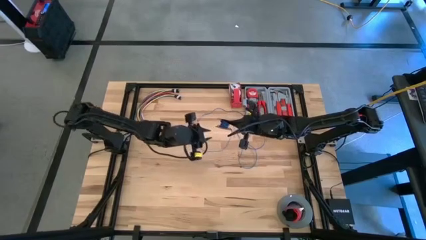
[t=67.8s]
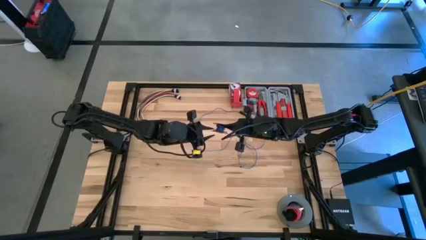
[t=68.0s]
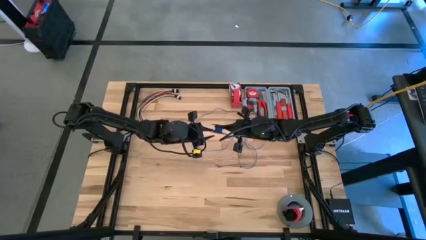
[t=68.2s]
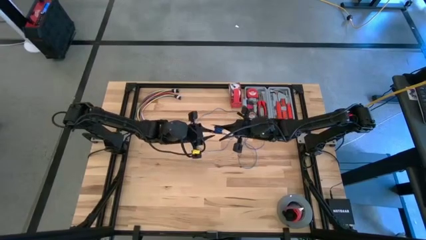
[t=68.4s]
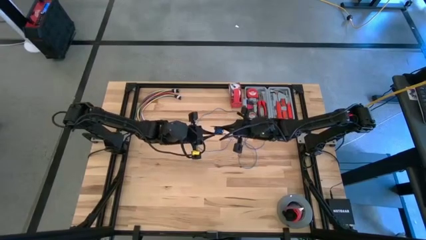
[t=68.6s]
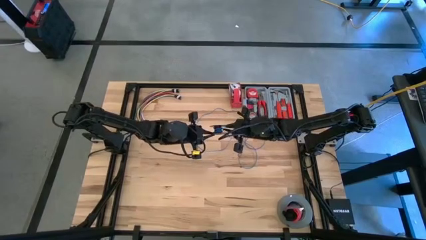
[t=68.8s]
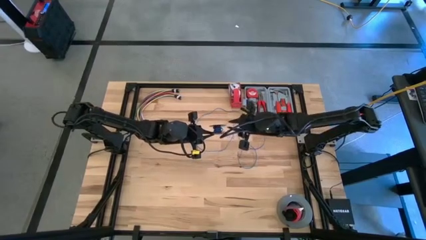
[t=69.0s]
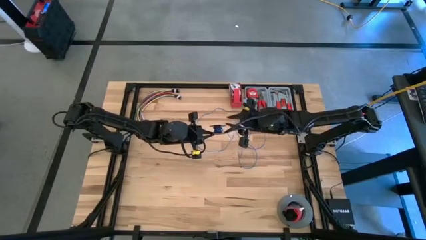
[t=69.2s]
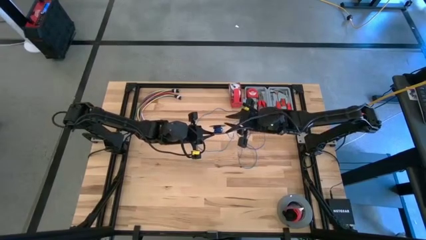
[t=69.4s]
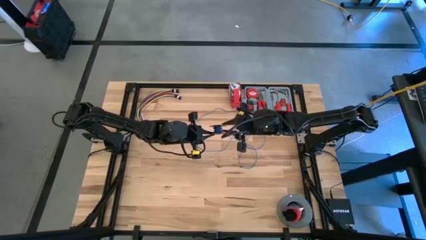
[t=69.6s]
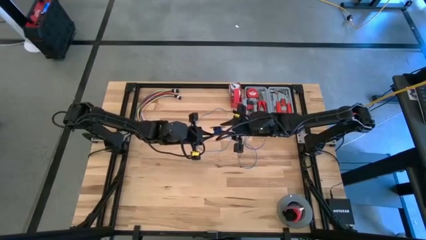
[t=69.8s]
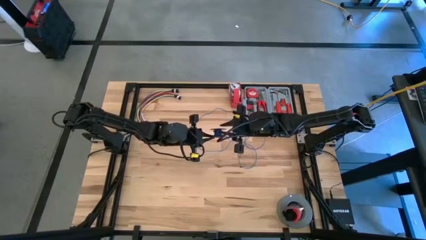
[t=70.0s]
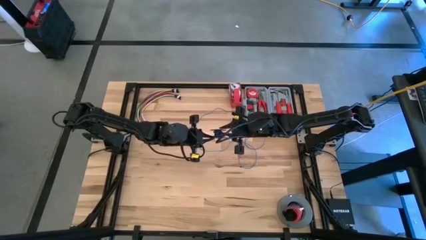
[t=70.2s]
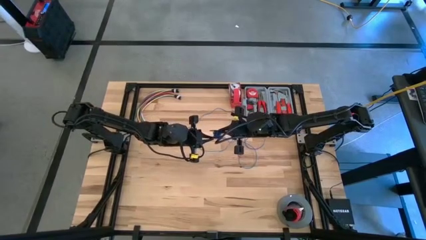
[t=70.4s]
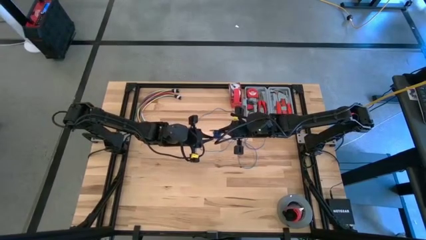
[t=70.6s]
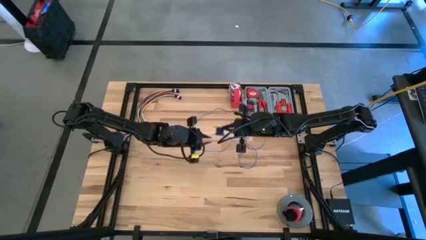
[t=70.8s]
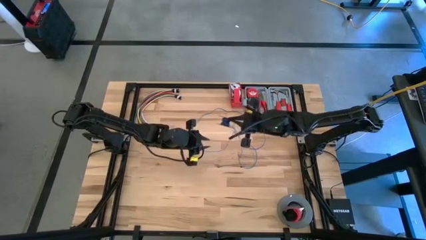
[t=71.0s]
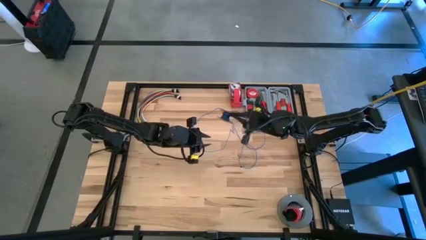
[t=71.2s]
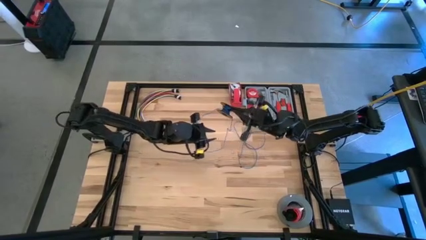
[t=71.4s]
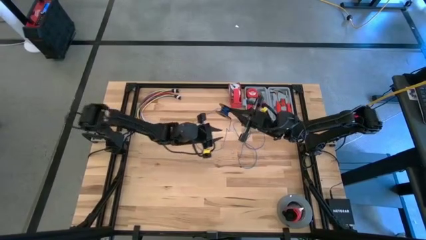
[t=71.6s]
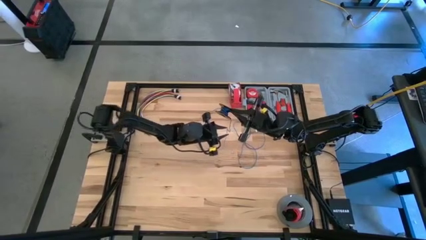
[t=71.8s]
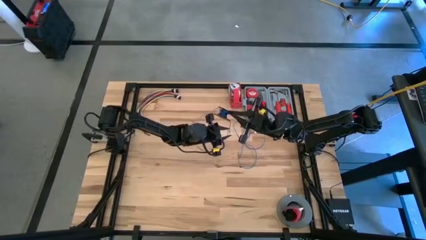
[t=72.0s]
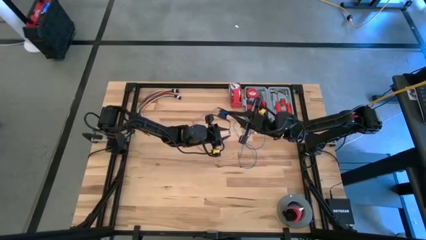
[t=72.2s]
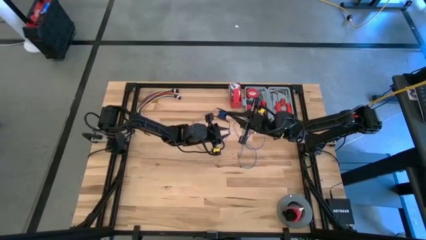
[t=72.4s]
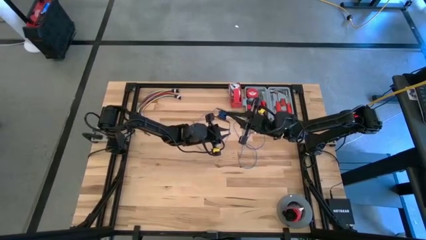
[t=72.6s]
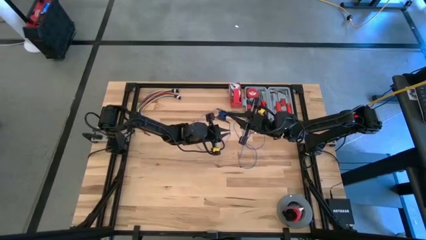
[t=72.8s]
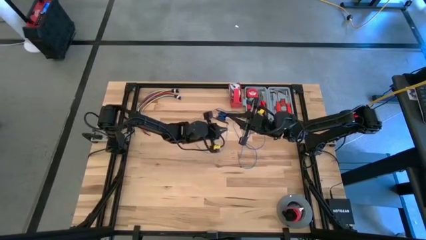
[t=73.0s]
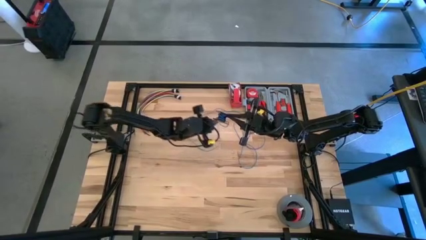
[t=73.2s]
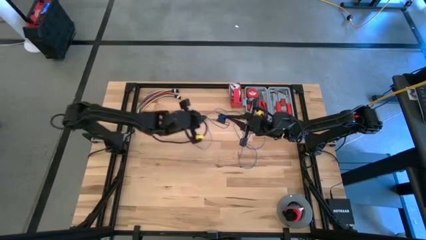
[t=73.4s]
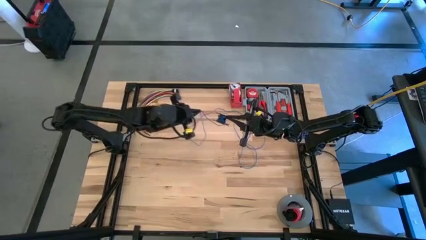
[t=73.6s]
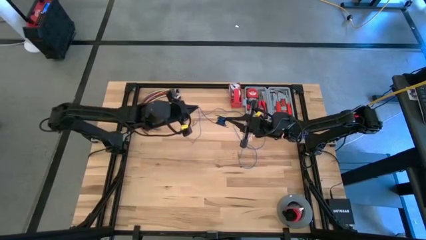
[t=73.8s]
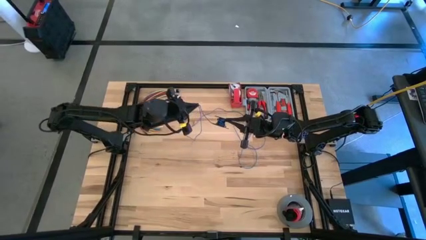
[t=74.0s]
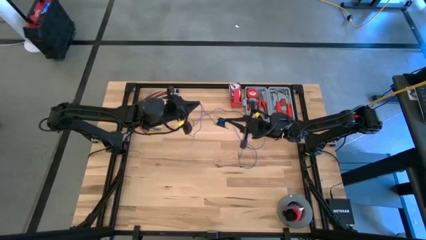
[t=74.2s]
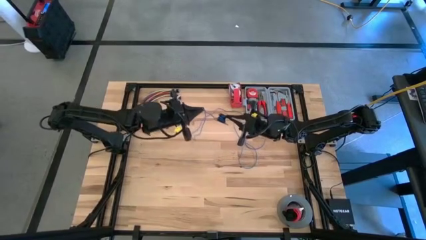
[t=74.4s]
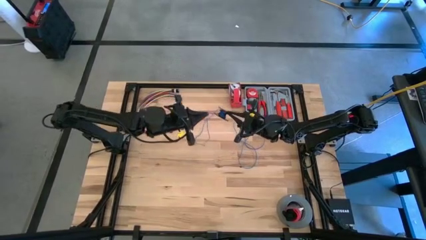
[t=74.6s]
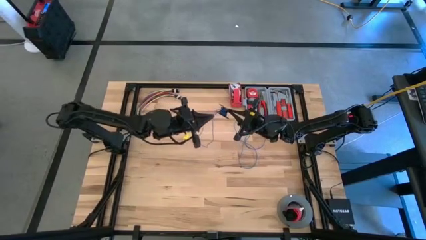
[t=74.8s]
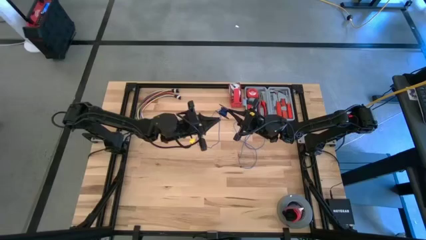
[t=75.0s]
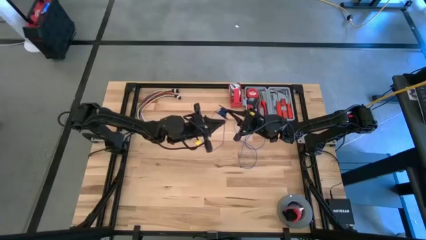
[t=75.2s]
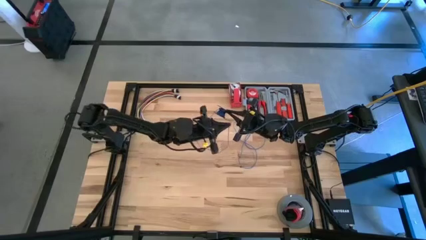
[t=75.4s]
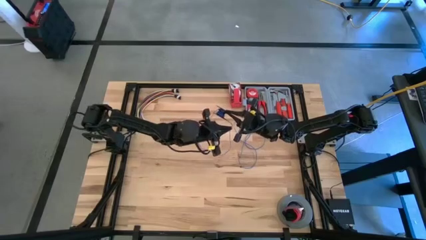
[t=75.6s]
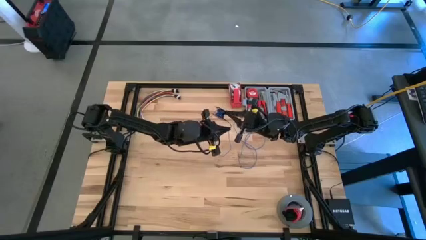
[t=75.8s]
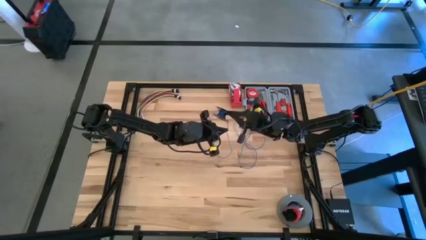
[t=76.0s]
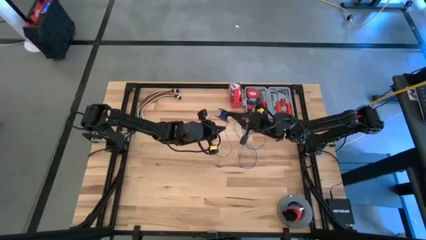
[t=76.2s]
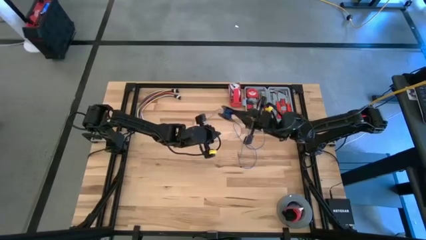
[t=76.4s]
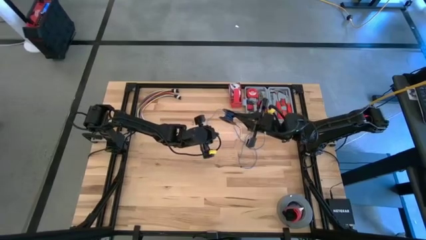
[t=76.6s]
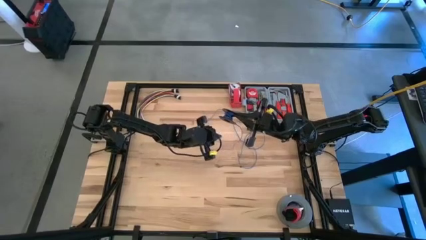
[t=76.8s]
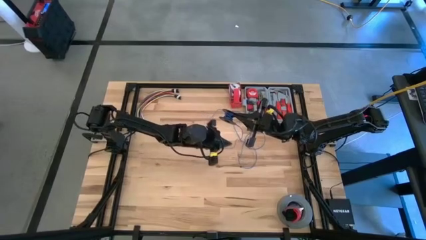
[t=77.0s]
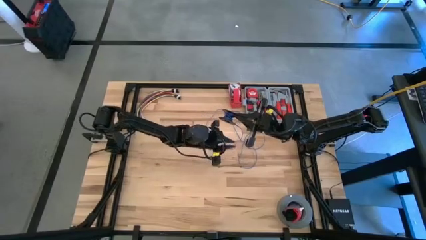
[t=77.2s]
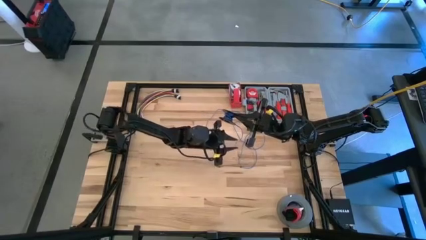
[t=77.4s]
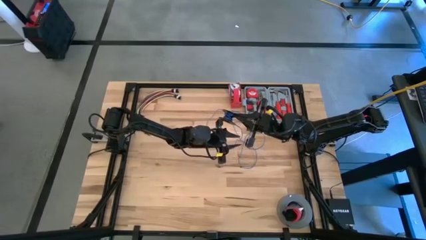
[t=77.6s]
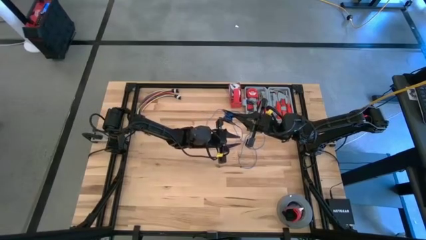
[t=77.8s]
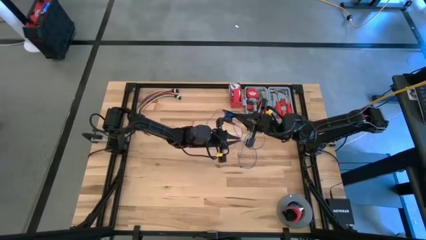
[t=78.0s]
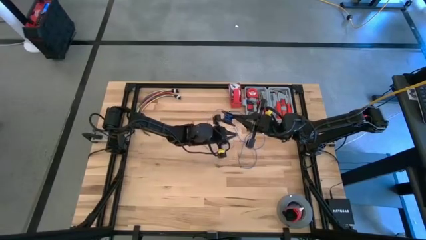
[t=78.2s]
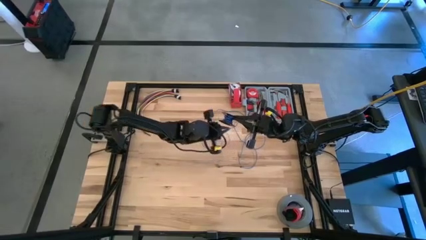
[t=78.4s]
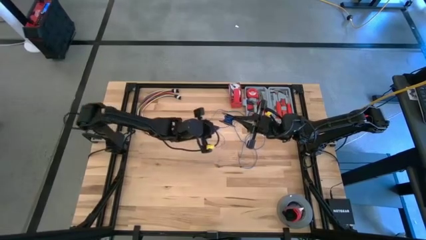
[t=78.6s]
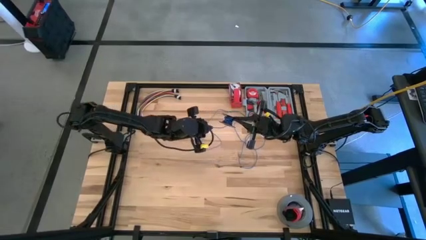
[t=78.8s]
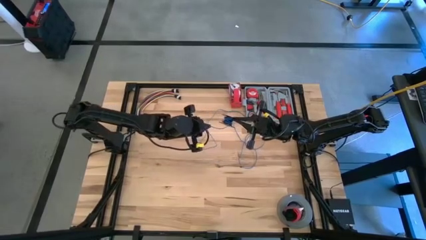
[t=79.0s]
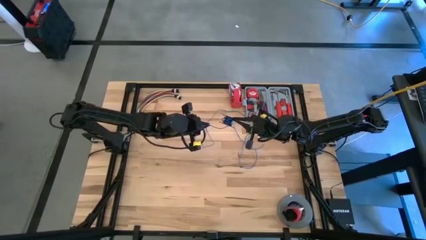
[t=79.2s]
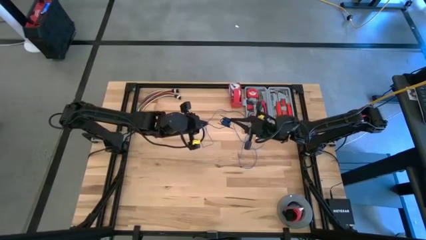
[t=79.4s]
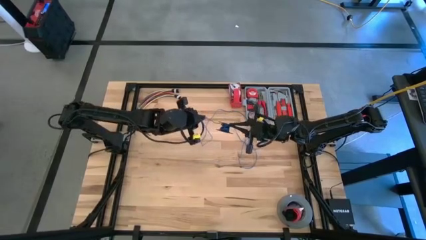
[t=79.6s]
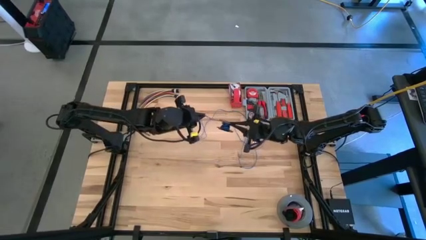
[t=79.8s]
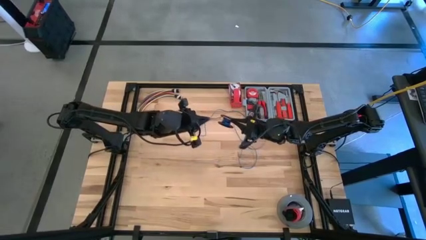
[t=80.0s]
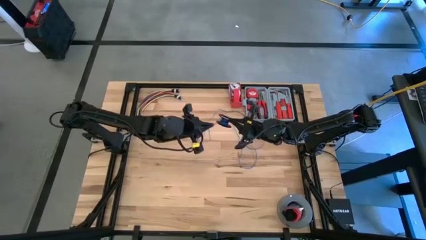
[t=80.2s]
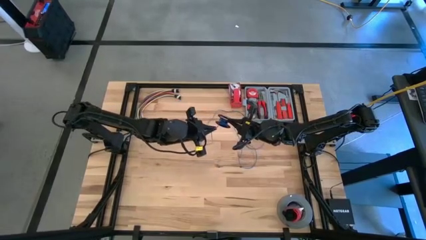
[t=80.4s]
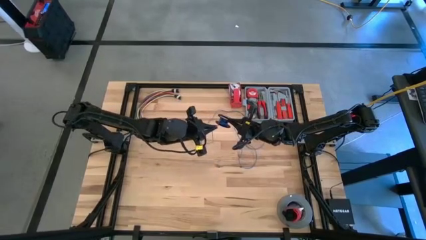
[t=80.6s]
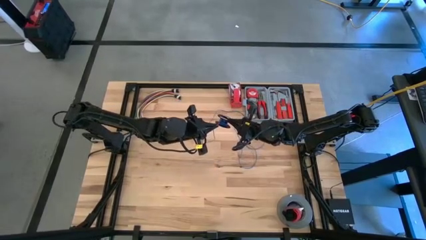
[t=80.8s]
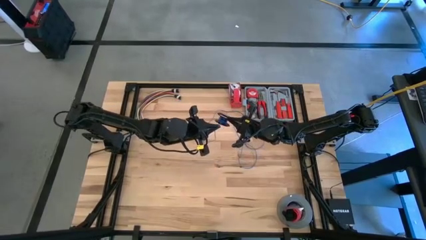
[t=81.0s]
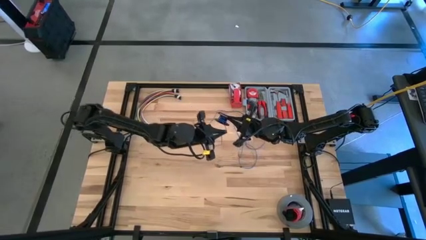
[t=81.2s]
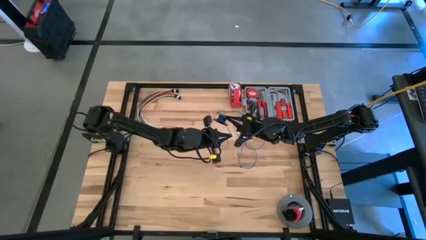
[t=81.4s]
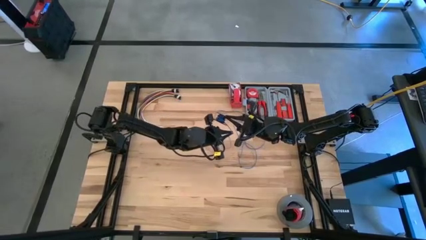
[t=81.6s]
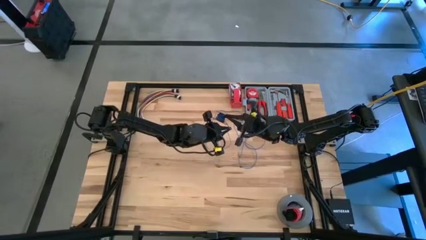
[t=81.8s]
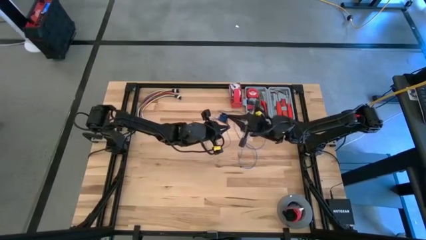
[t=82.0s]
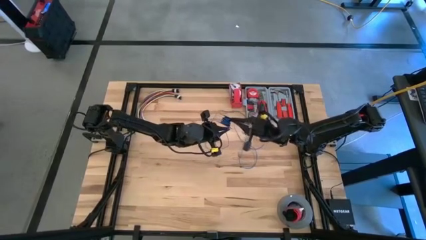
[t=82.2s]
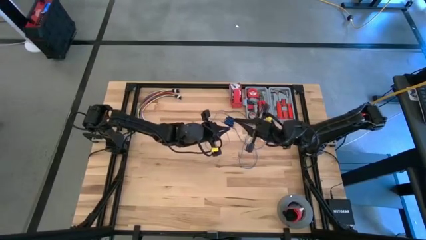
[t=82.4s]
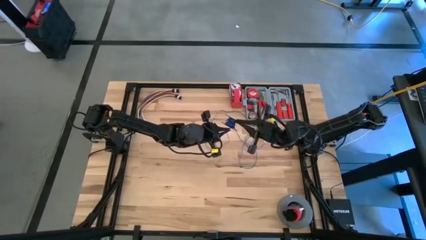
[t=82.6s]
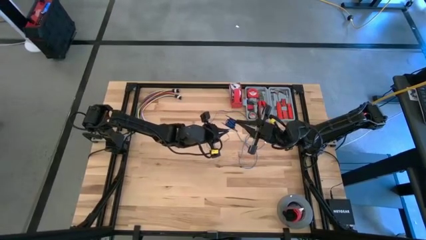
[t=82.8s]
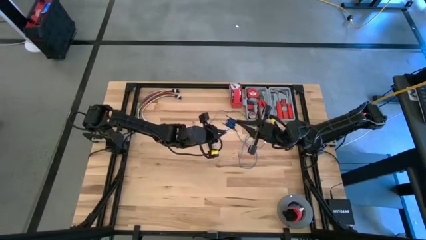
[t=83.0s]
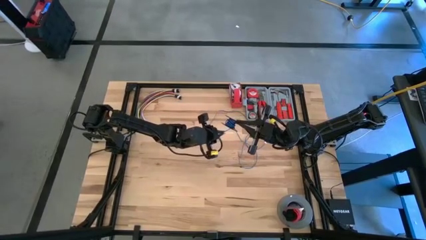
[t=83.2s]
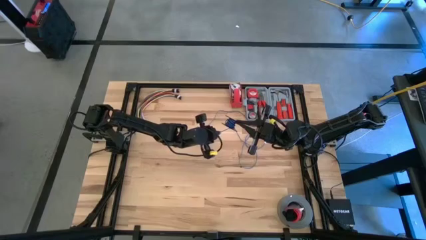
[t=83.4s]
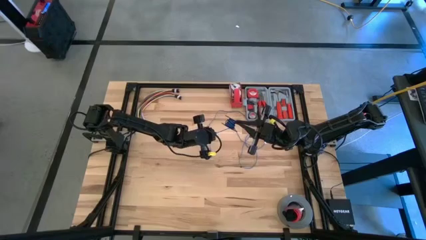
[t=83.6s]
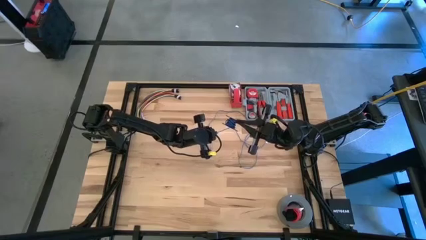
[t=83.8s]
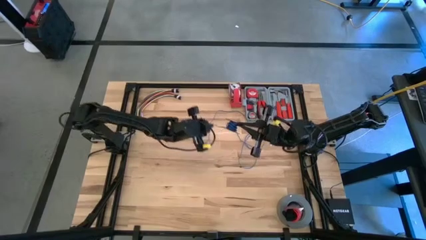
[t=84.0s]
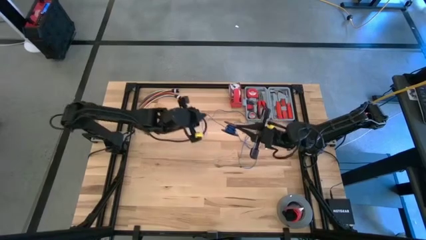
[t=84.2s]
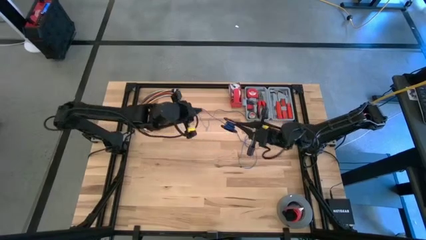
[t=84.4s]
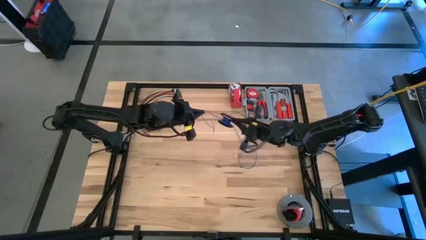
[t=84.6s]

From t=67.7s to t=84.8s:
Task: Coil cords
Coil the blue wire on the black spool
